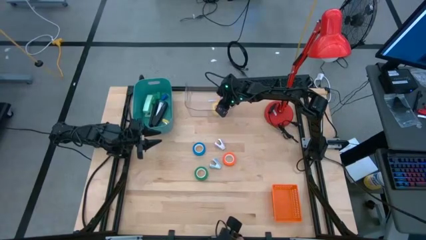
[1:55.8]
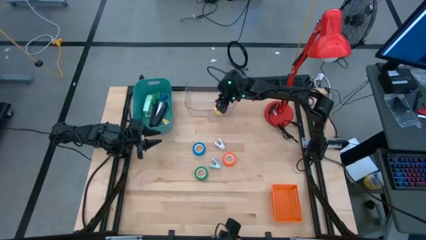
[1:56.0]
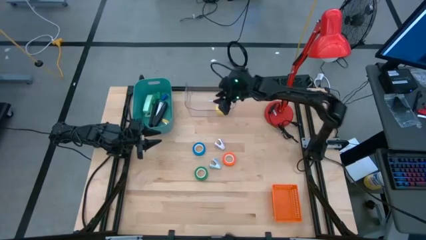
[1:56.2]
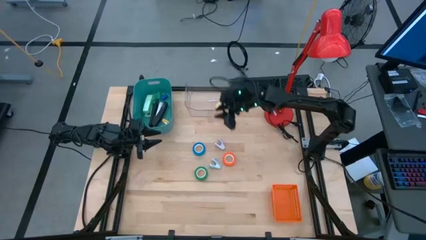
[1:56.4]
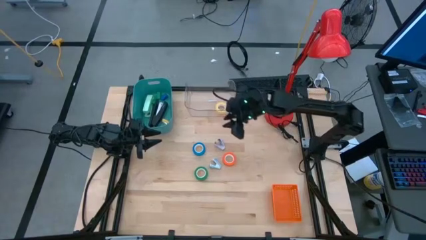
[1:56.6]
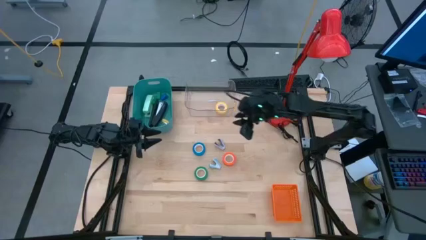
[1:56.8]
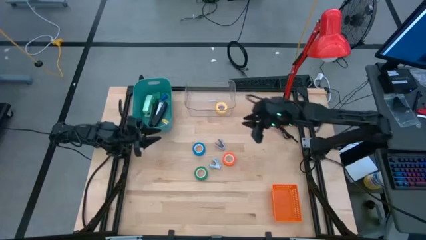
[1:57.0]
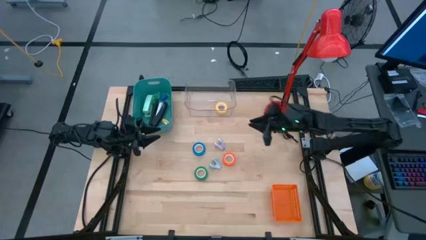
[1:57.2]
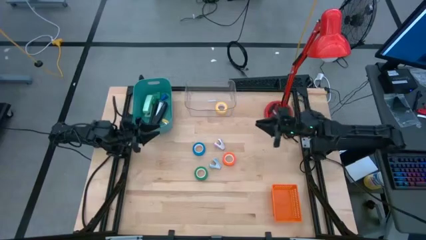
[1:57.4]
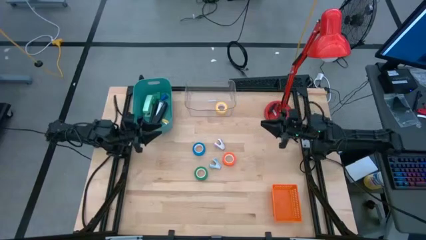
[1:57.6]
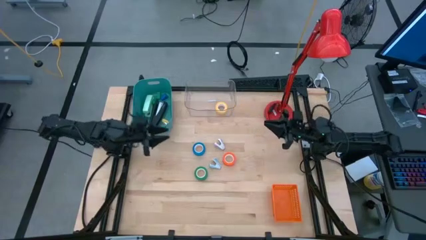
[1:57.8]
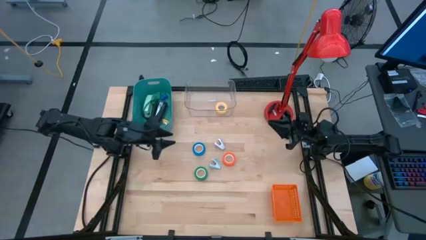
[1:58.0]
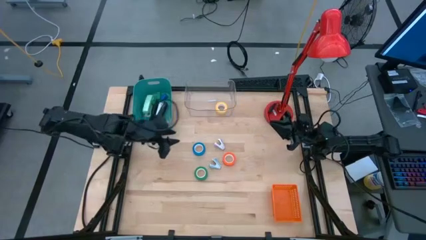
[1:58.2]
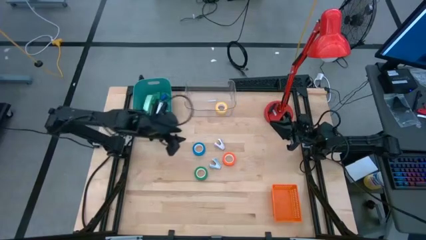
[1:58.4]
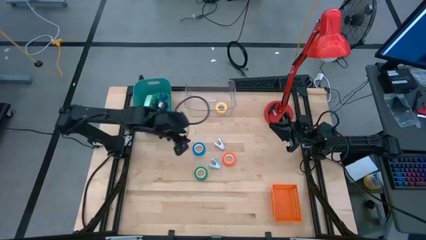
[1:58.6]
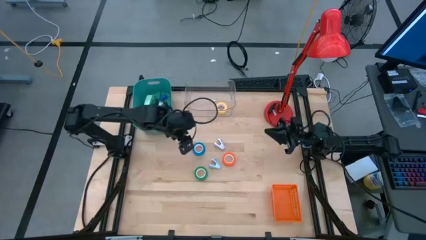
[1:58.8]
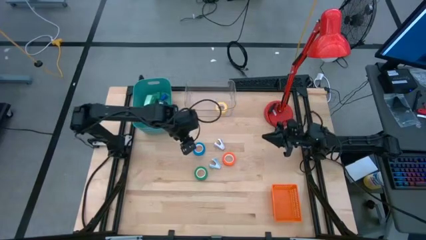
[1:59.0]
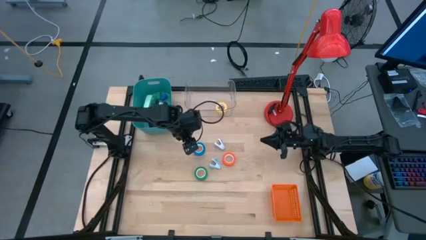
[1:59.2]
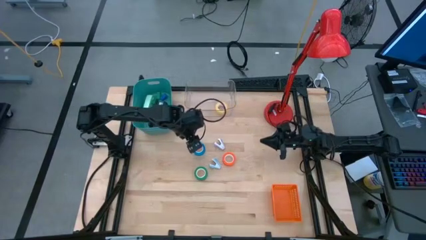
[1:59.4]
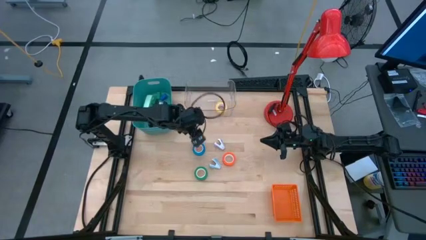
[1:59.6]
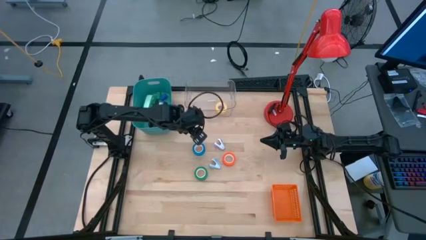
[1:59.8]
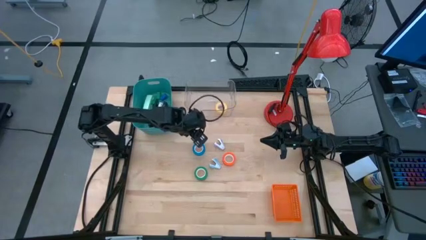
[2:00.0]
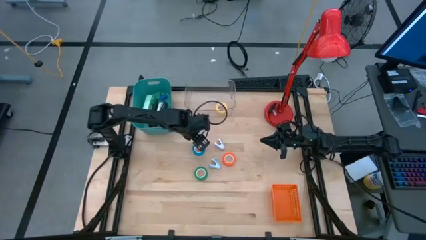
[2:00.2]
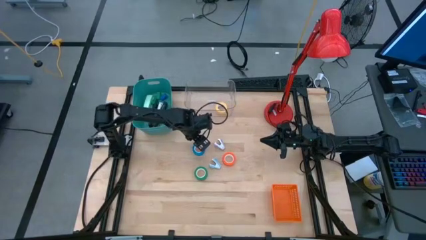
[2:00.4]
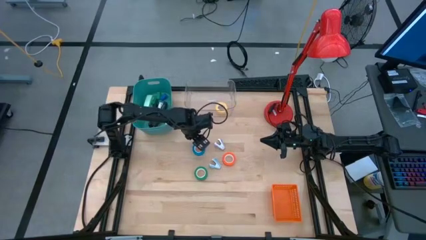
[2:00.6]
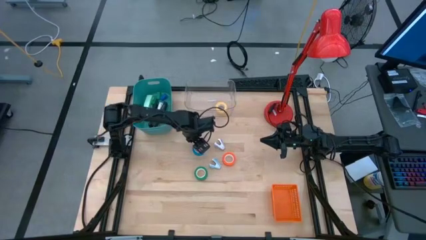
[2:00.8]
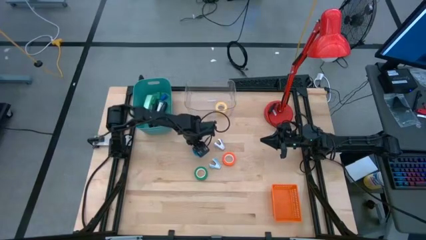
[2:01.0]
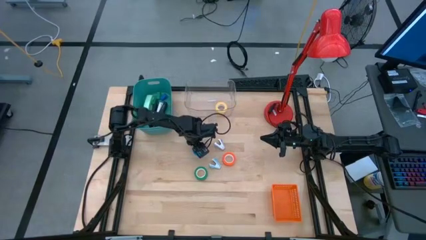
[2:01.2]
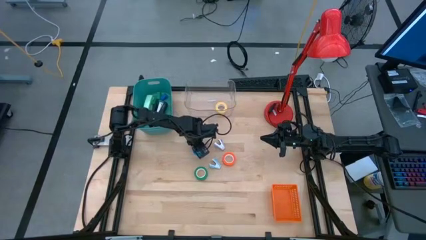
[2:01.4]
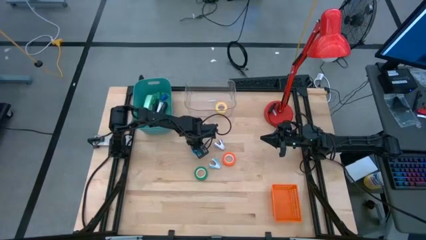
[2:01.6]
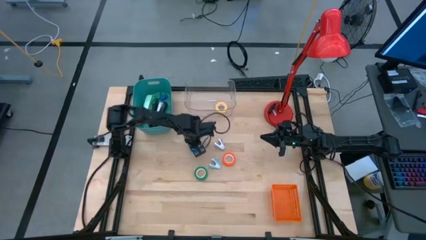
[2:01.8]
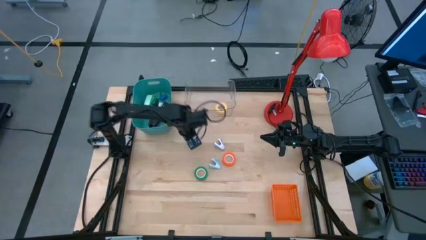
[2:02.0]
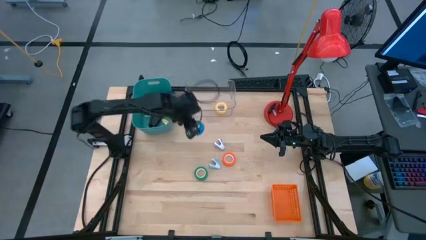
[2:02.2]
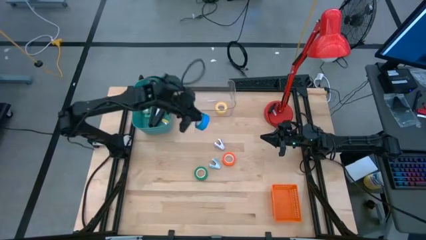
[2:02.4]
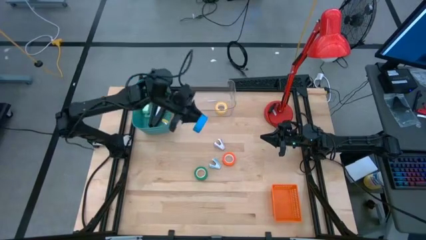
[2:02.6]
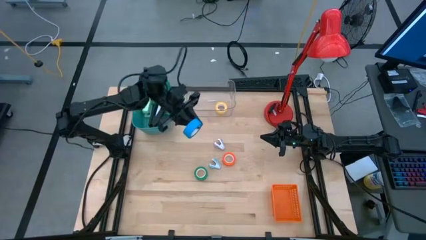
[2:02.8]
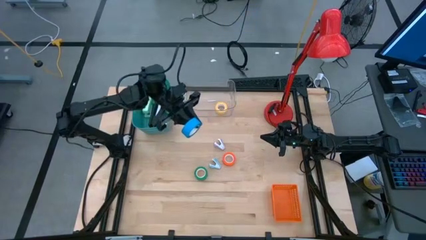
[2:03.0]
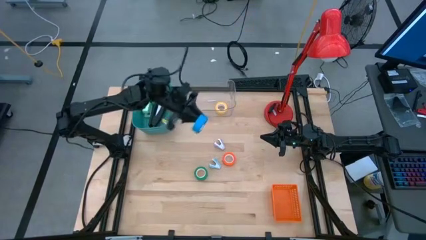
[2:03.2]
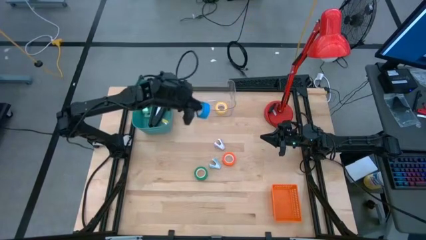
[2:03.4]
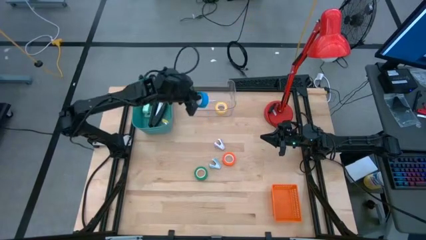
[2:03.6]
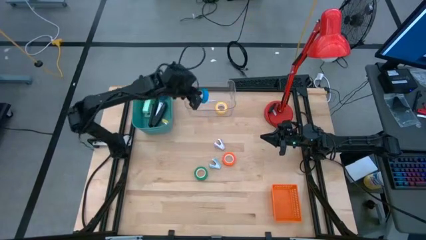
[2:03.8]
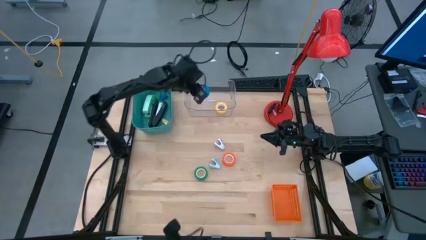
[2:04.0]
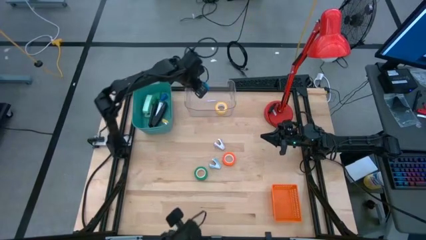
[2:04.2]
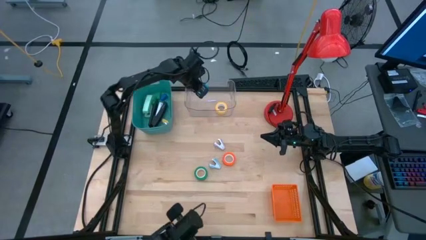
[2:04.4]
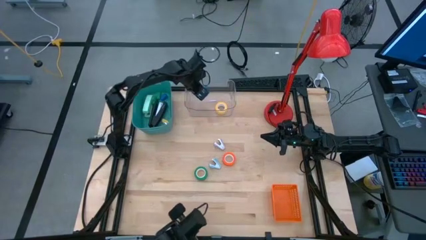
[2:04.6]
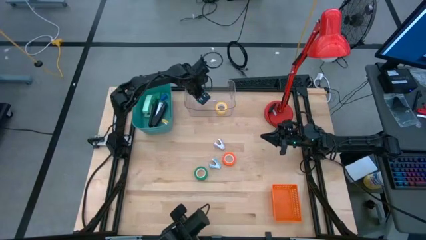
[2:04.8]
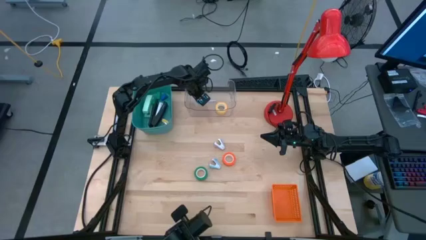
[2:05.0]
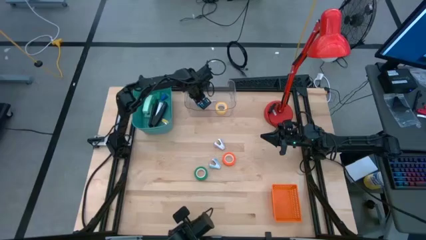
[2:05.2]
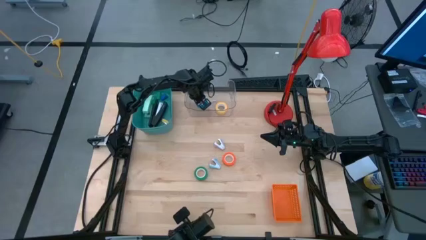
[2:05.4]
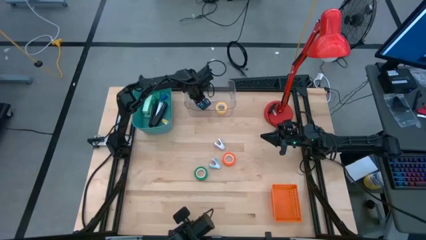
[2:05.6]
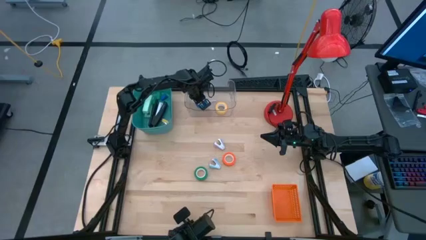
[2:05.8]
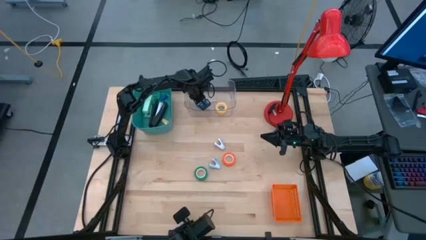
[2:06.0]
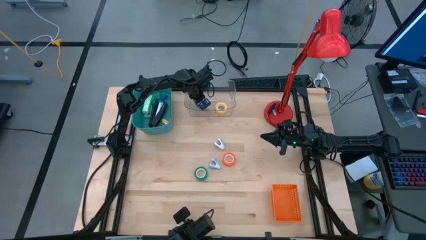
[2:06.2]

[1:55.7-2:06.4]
Task: Pick and place Stapler, Stapler remover, tape
Put the blue tape into the transparent bin
